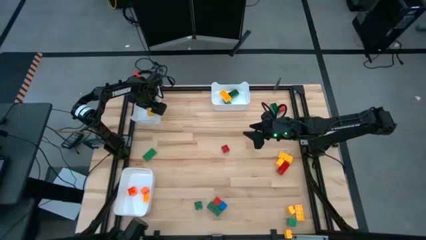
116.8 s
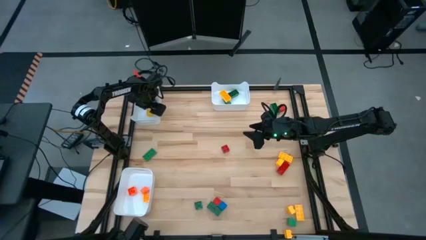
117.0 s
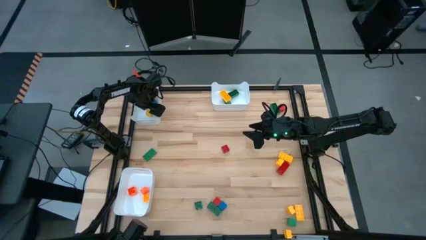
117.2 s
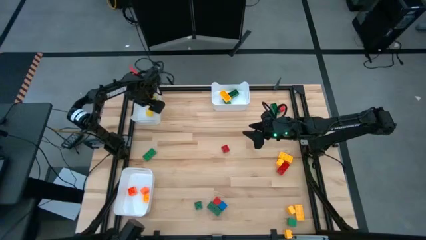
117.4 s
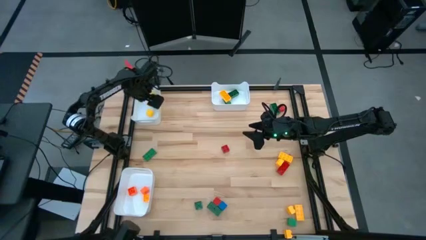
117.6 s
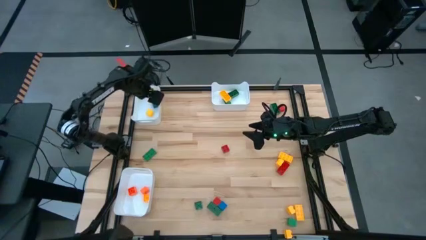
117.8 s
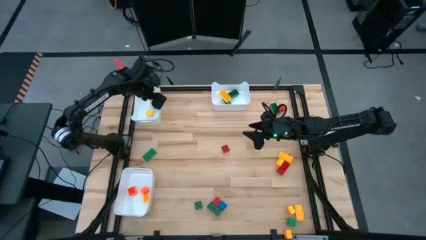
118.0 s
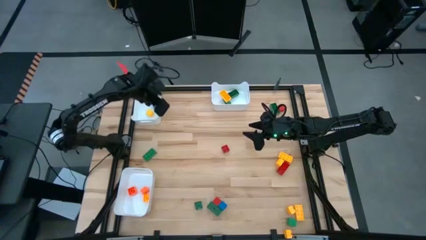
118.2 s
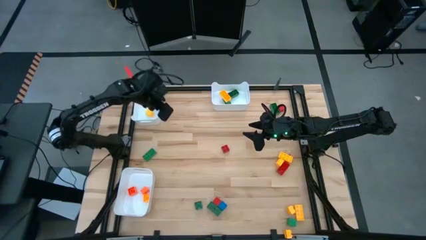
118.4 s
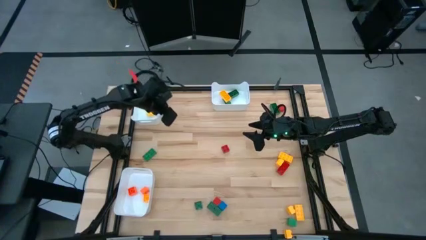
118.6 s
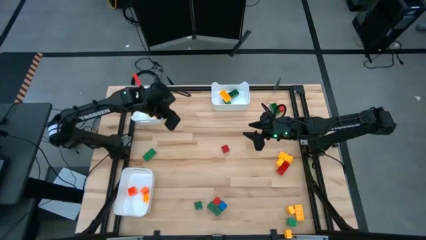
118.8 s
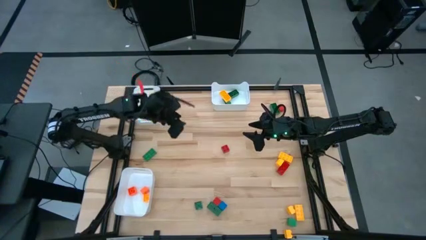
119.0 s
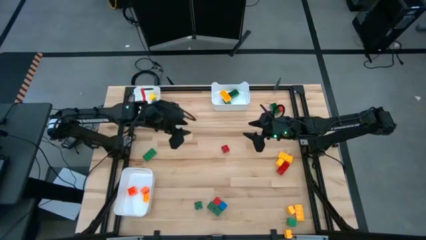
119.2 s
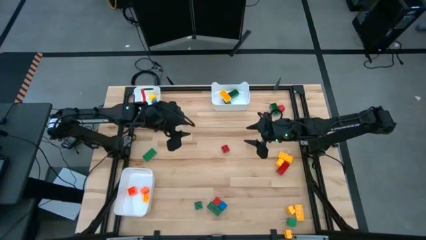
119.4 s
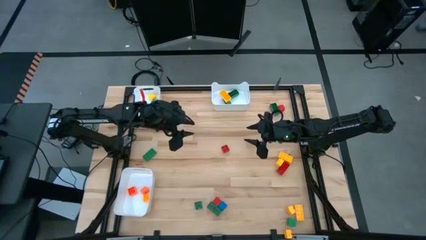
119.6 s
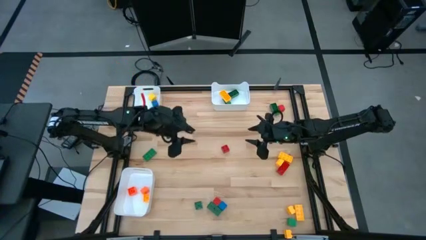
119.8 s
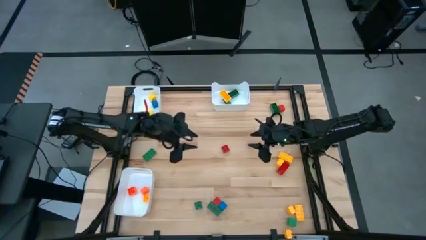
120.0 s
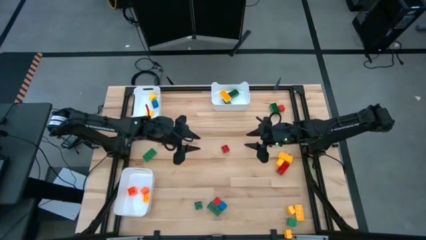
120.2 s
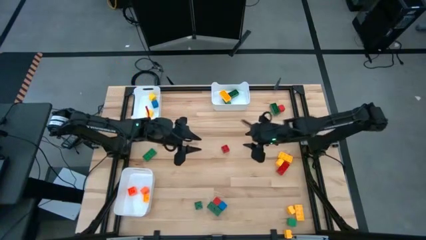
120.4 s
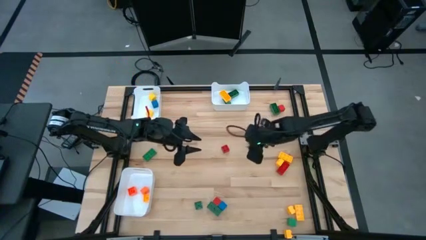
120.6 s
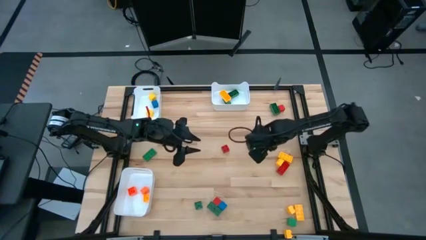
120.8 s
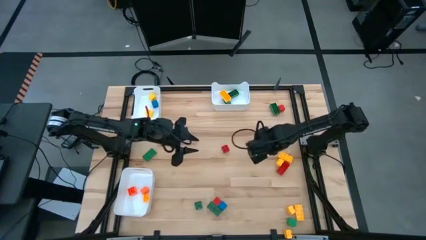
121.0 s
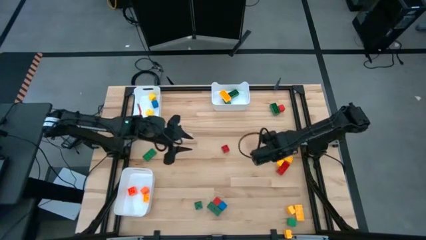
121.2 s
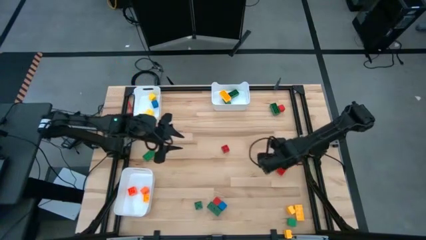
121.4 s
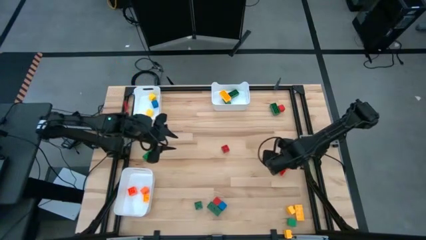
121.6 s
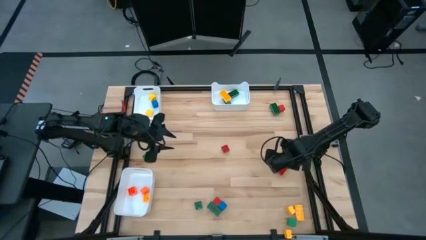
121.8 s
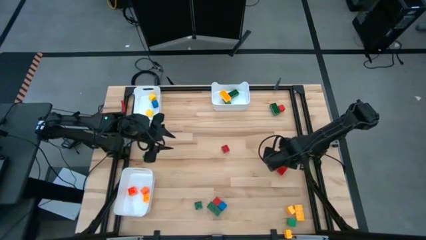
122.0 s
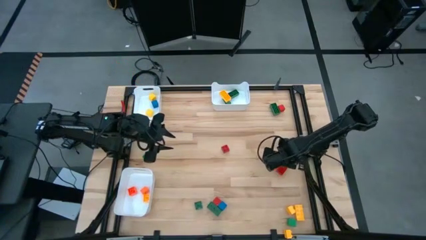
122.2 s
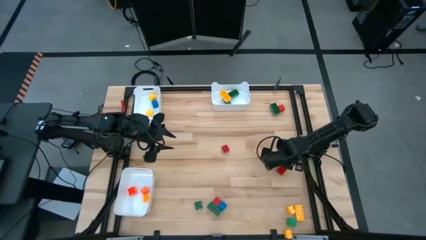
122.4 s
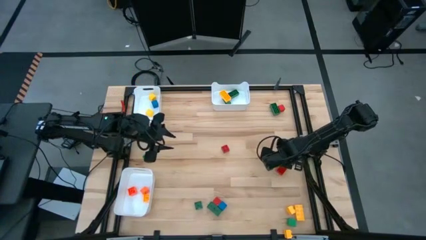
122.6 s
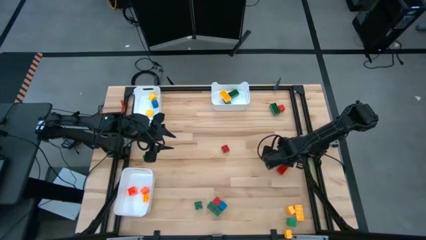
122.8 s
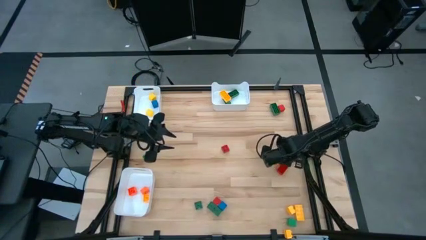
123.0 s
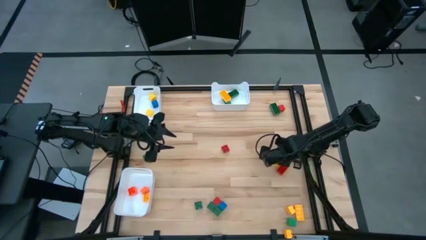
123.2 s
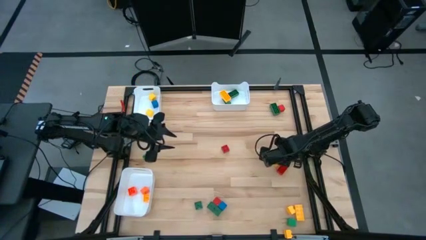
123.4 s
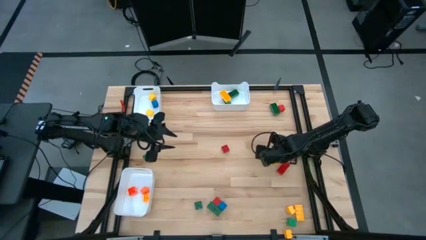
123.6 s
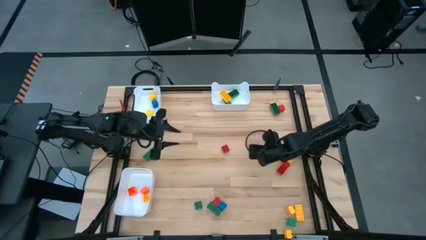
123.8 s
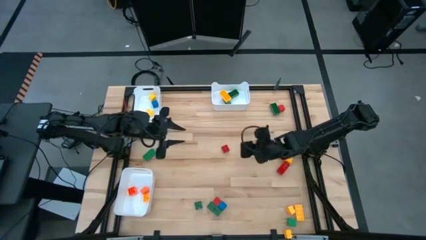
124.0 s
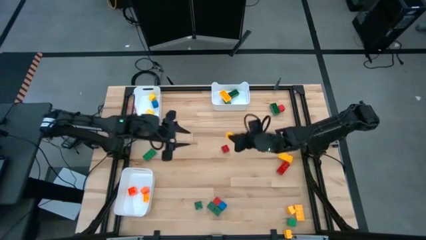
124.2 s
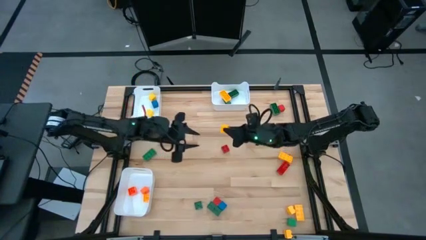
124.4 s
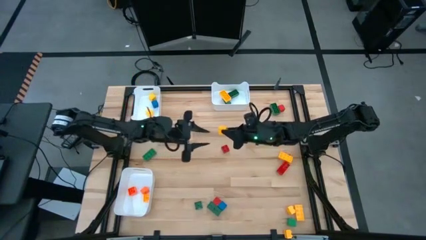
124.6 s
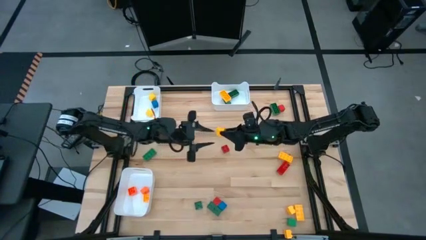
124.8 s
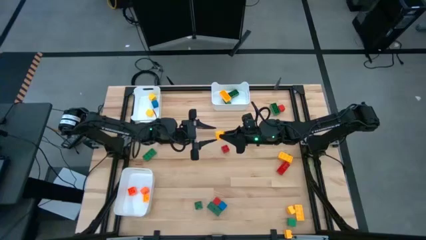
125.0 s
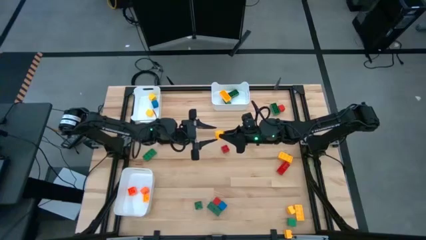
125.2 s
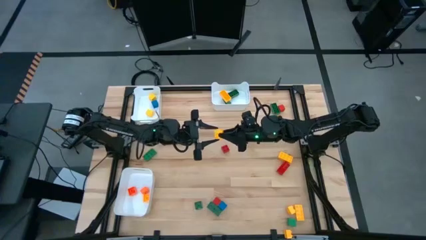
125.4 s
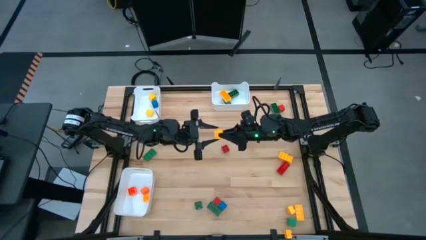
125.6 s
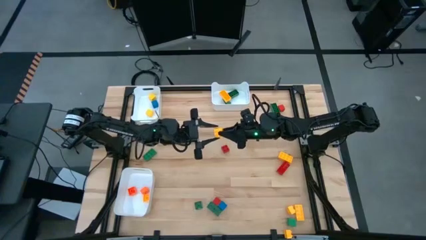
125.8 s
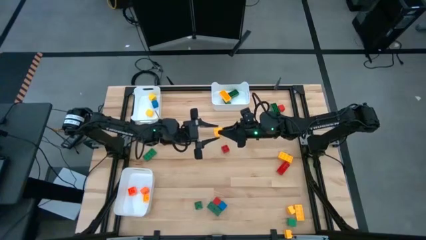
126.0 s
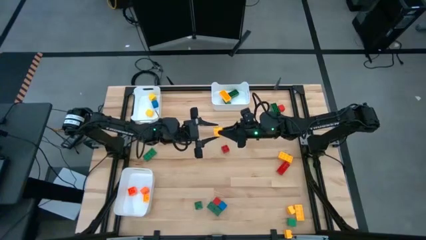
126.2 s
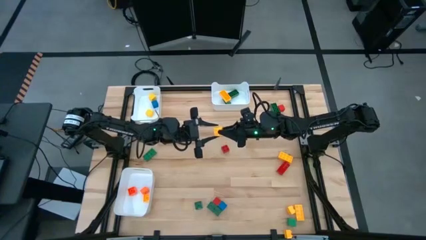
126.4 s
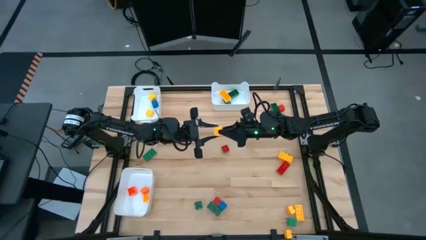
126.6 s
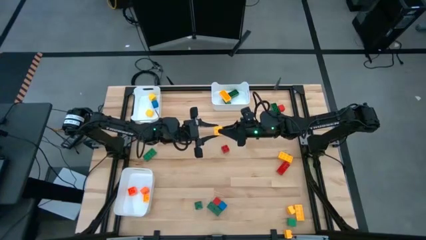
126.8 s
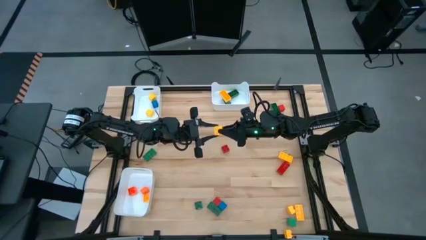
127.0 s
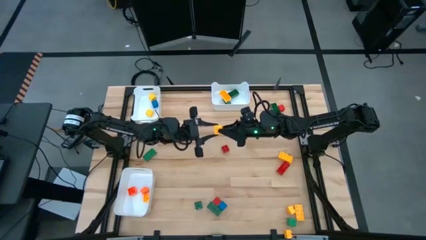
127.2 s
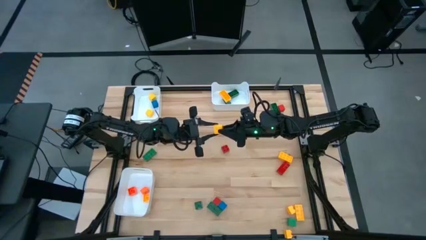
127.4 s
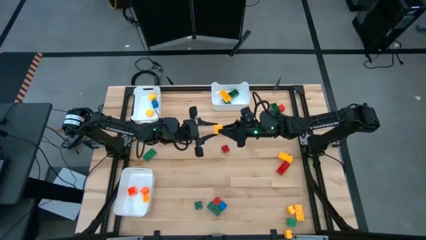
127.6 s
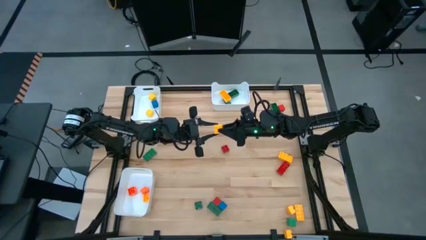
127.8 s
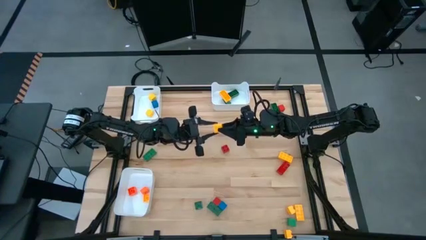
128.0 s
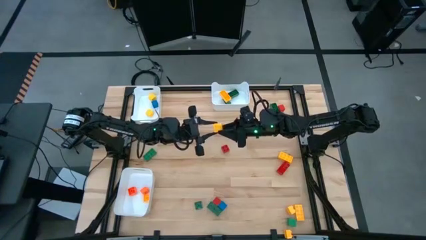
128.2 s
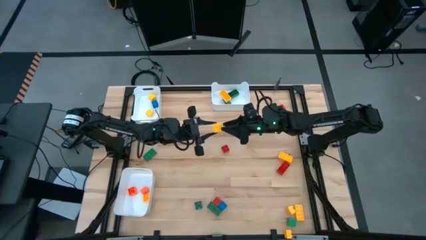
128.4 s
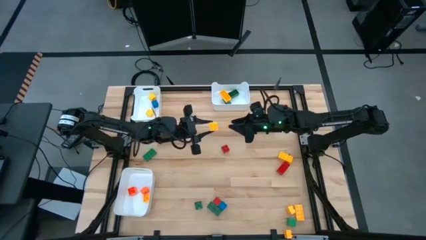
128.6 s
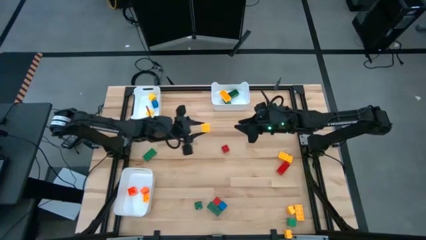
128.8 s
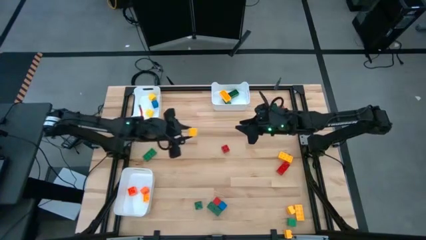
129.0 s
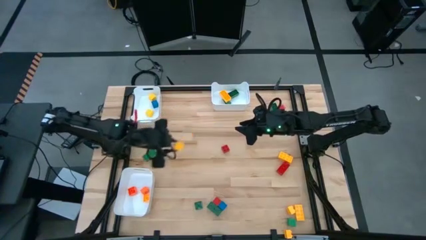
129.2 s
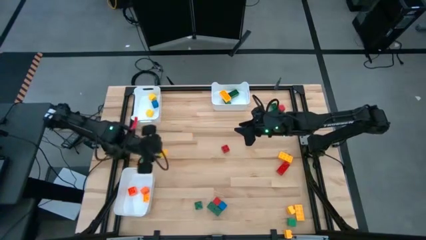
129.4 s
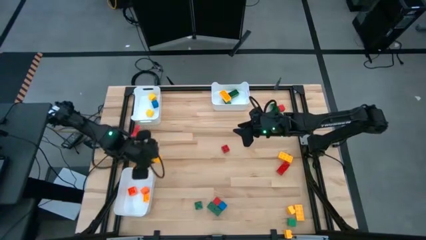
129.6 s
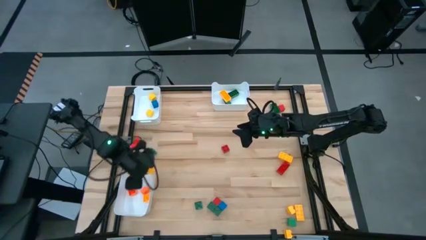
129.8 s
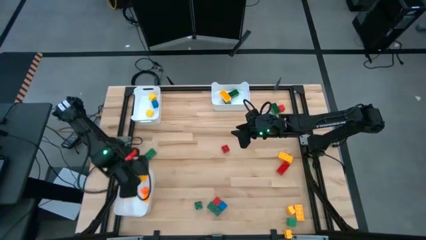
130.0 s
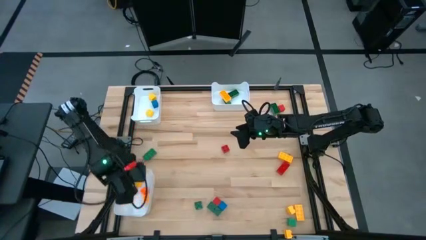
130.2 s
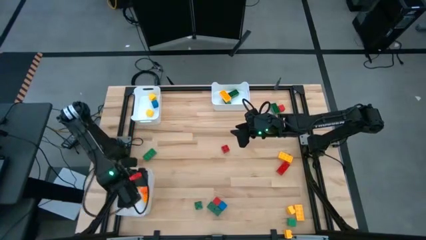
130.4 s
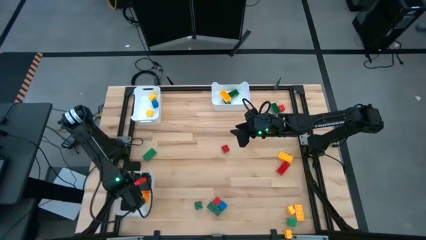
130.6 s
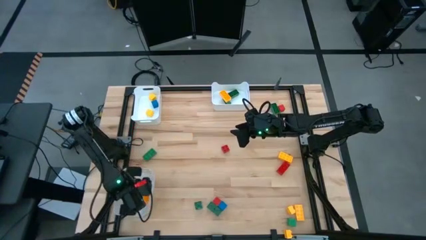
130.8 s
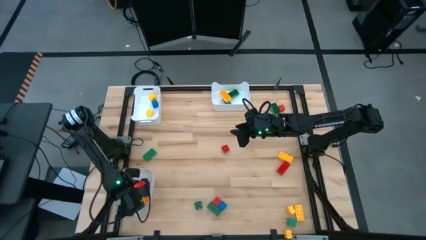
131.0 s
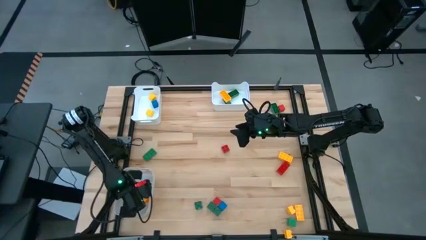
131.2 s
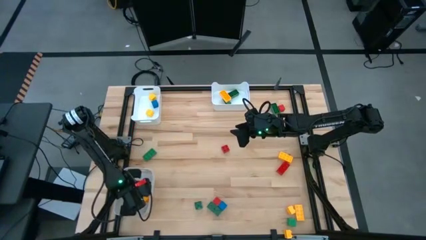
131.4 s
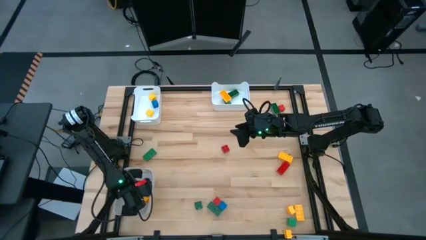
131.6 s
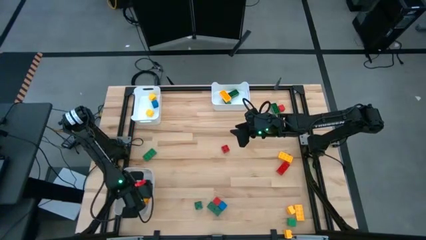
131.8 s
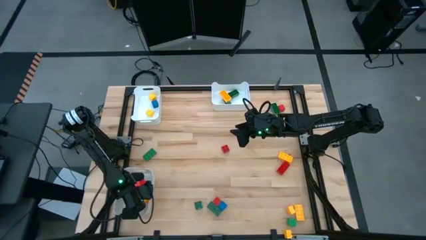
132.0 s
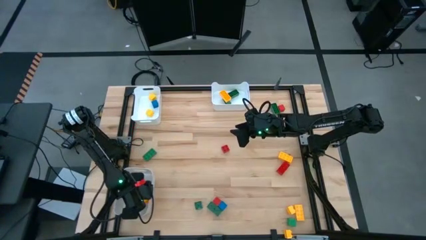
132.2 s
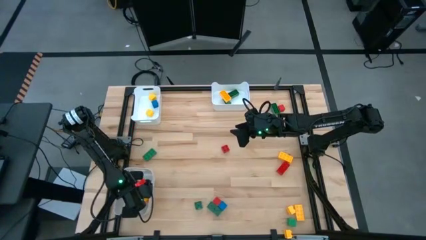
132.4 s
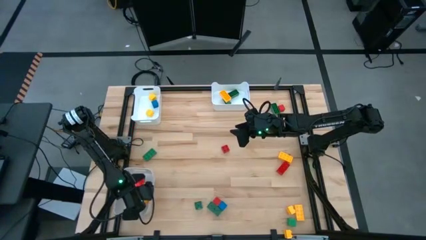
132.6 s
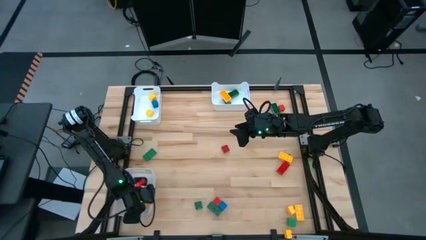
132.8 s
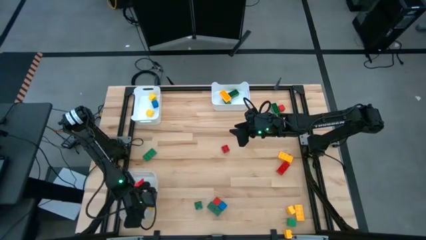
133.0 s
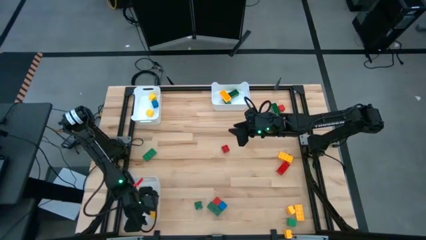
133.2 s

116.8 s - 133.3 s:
Task: Sort blocks by size
Put the yellow 4 stud game piece into the bottom white bin

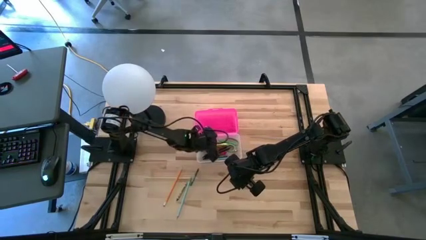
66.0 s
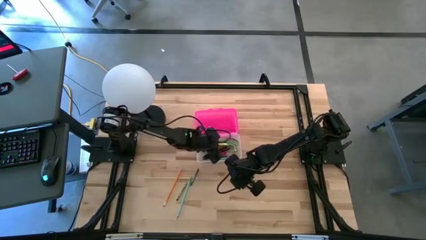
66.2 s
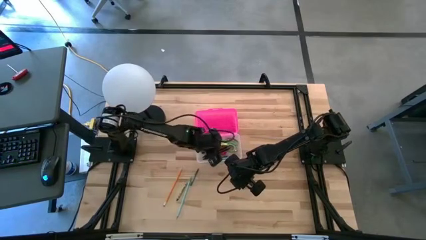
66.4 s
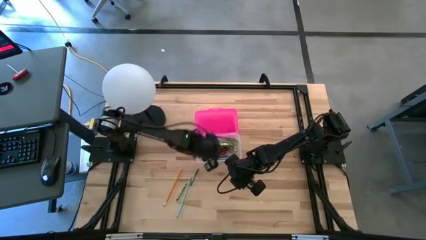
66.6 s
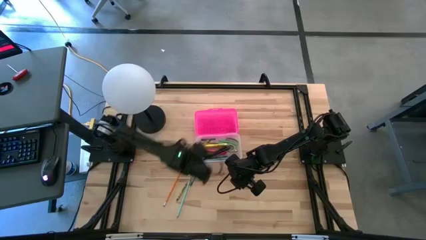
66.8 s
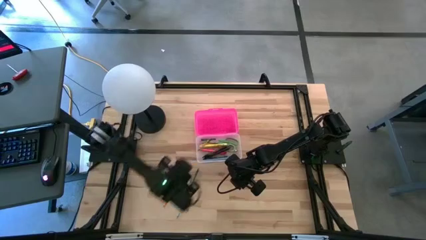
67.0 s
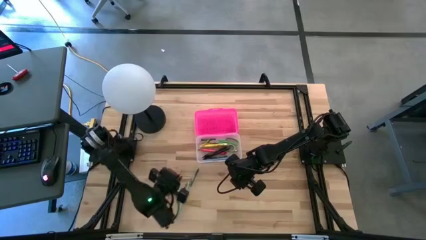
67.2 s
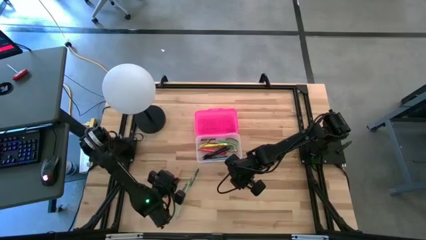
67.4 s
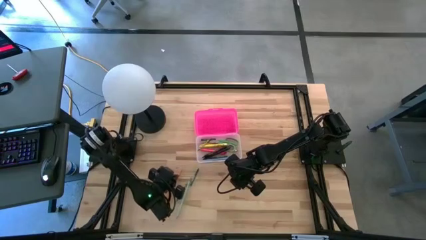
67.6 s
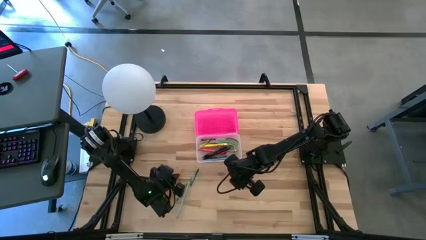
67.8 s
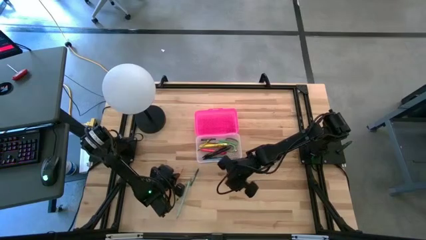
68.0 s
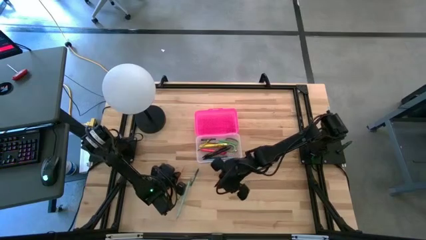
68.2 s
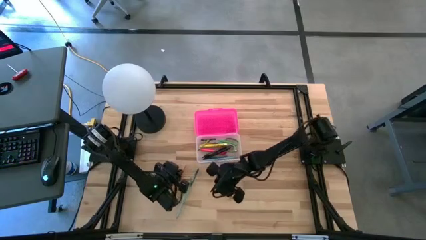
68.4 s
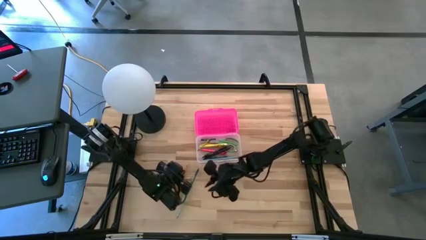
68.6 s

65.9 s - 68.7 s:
Task: Pick & place school supplies into a supply box
Move the orange pencil to the center of the table
